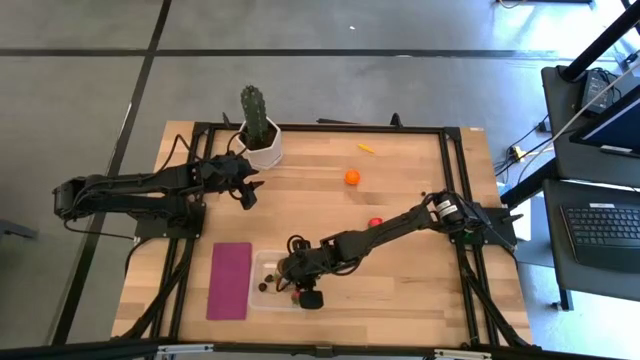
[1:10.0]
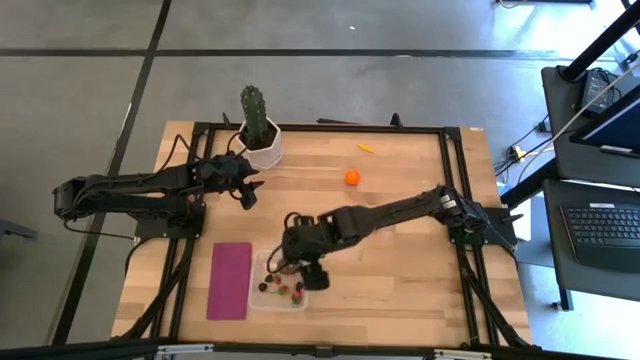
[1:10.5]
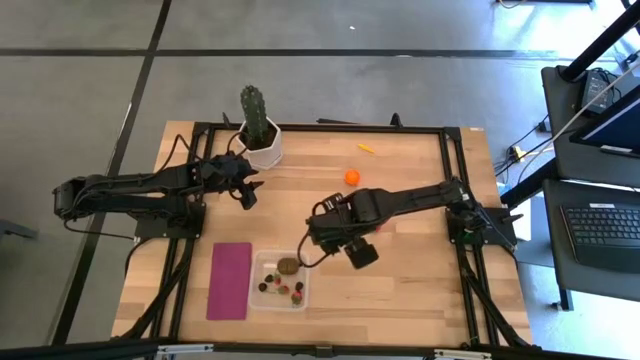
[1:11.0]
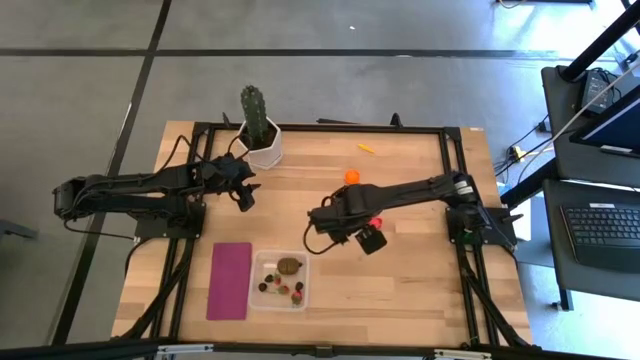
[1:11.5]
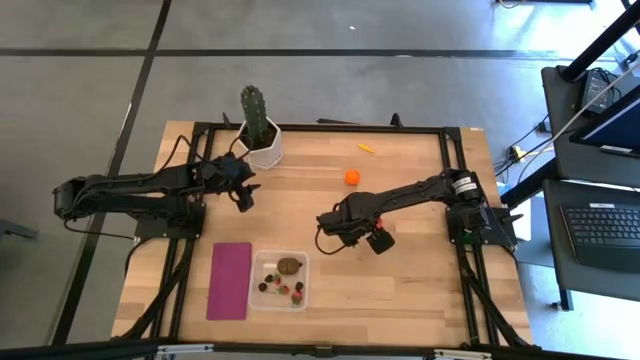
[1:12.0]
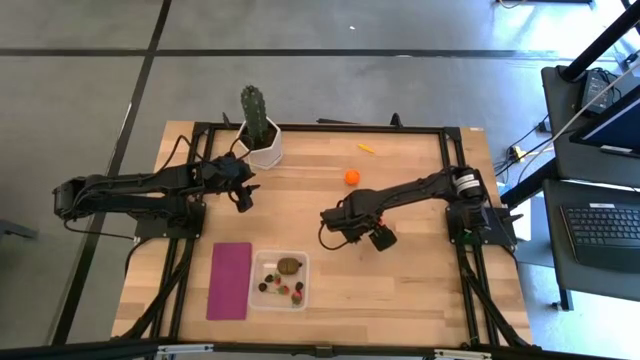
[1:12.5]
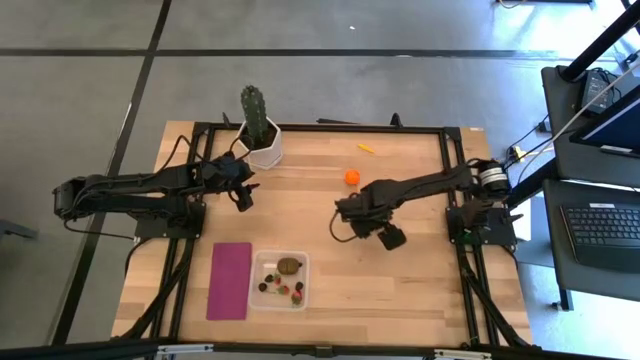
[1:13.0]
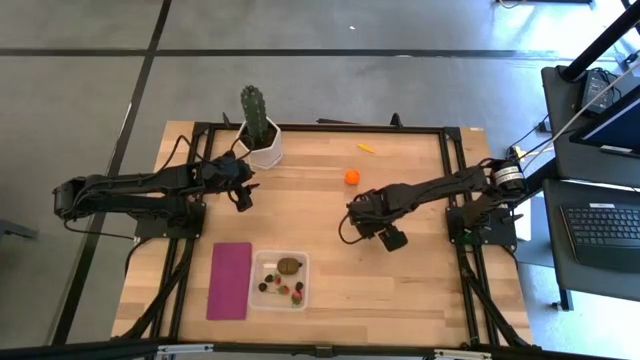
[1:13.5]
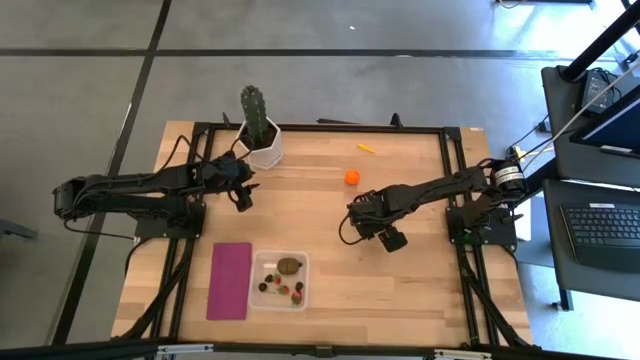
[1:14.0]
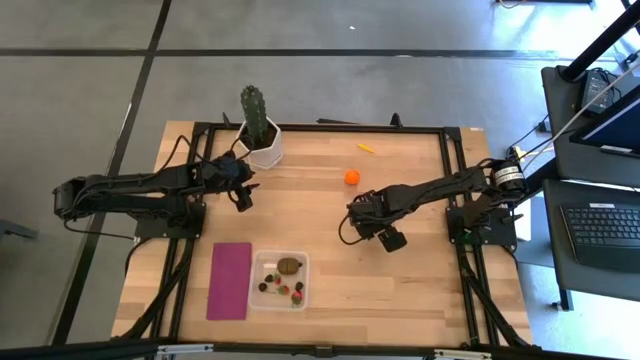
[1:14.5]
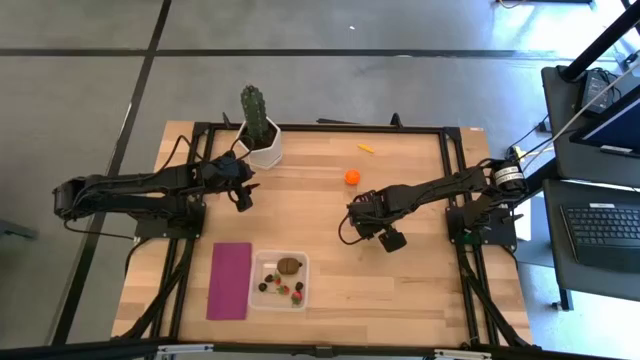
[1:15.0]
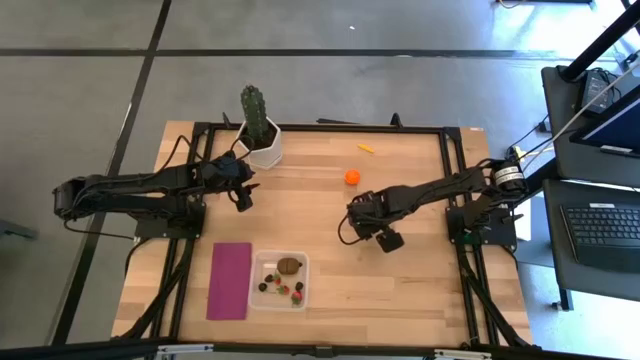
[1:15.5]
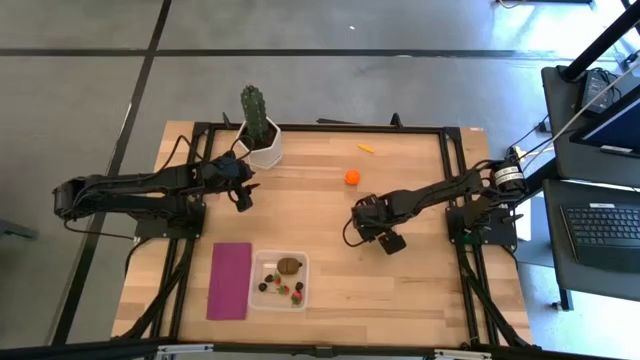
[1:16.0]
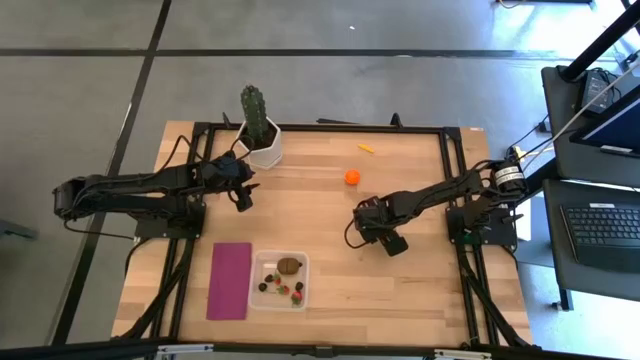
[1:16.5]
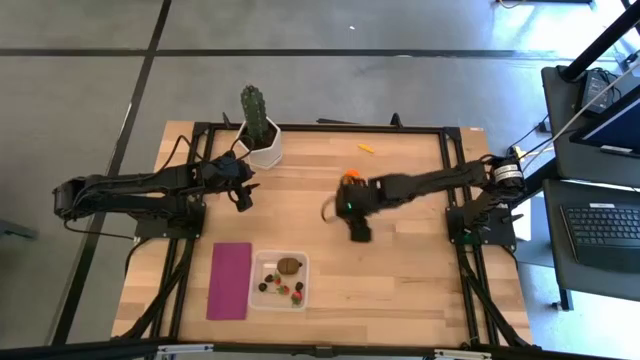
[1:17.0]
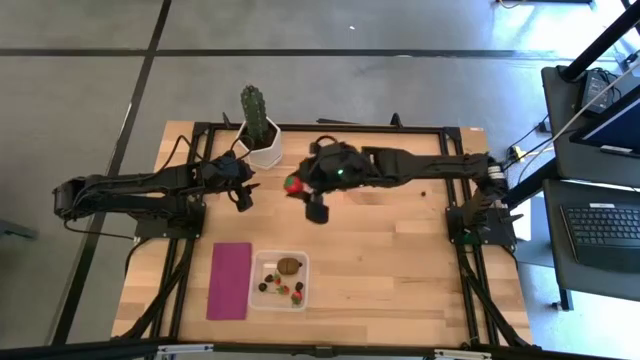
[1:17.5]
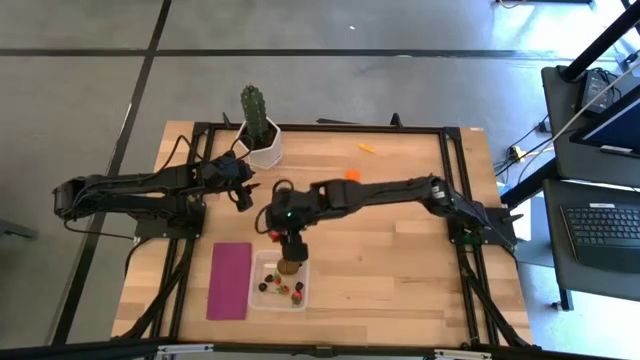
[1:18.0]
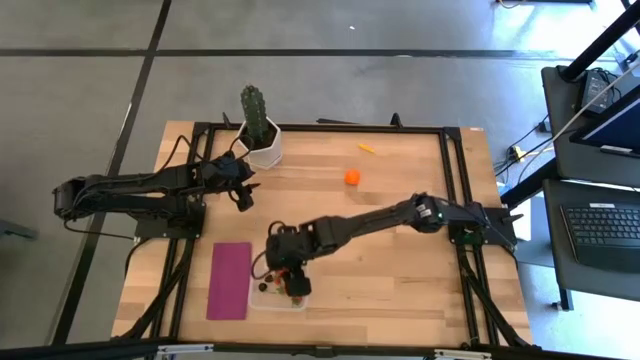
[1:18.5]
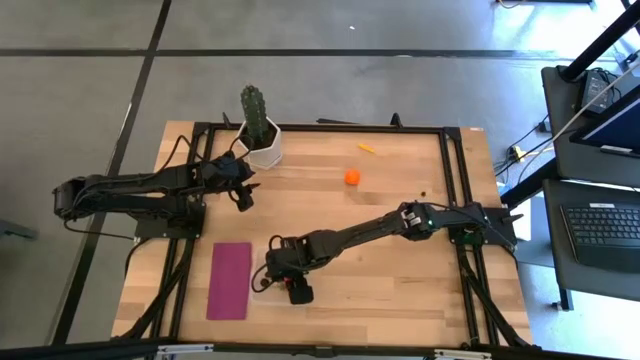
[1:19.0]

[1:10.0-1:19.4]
Task: Pick and placing Produce into tupperware
Put the strawberry into the transparent bin

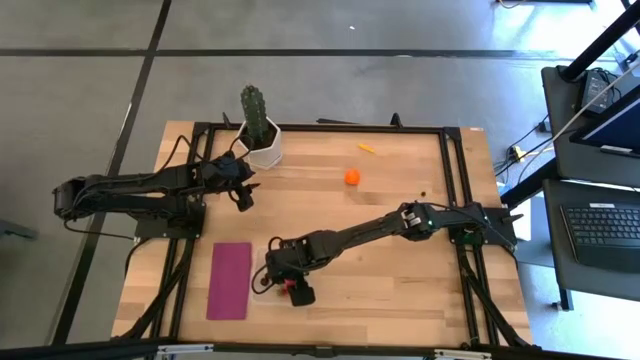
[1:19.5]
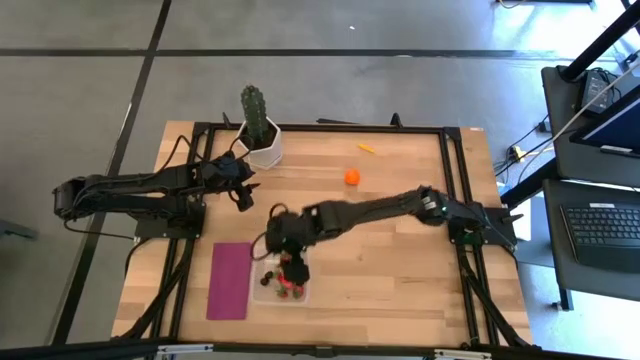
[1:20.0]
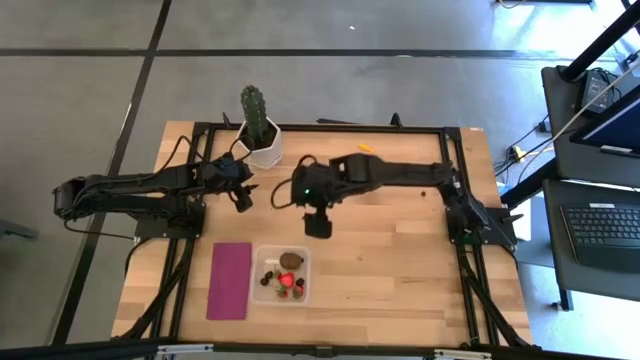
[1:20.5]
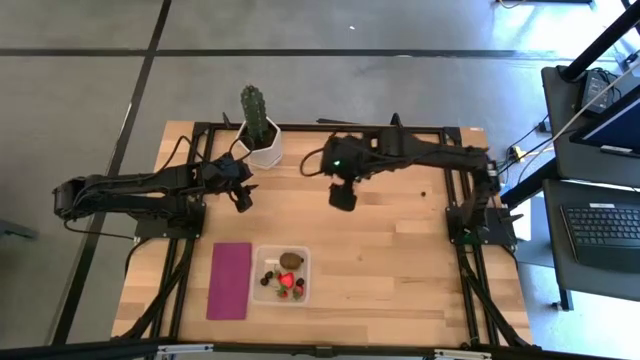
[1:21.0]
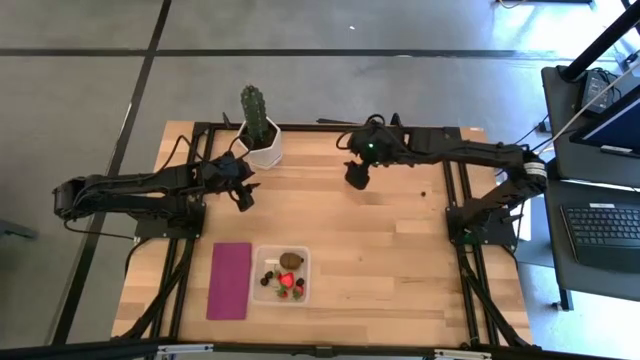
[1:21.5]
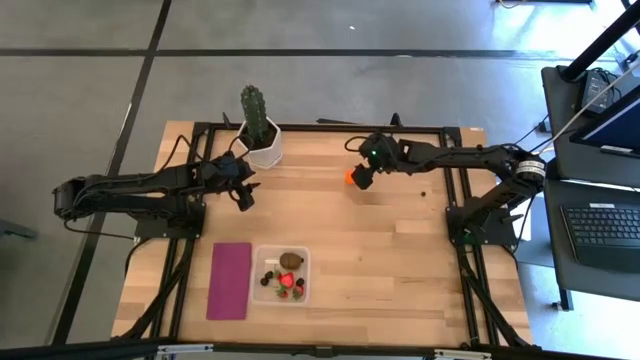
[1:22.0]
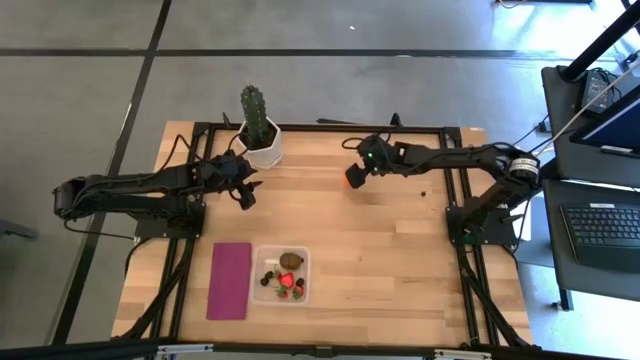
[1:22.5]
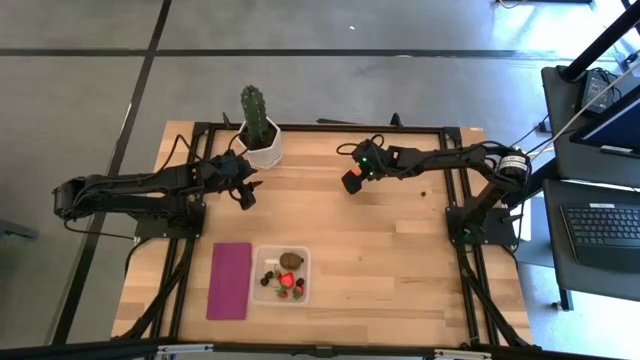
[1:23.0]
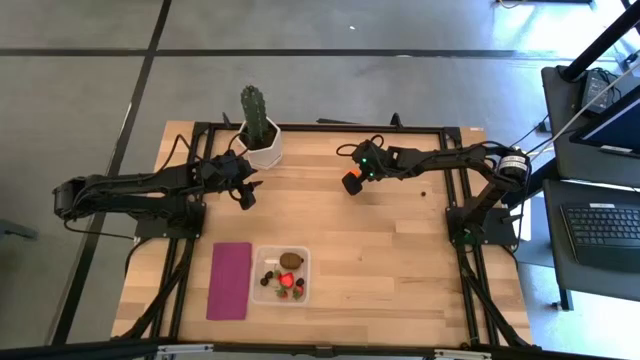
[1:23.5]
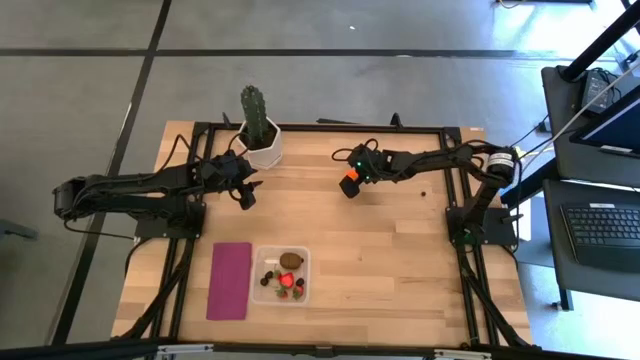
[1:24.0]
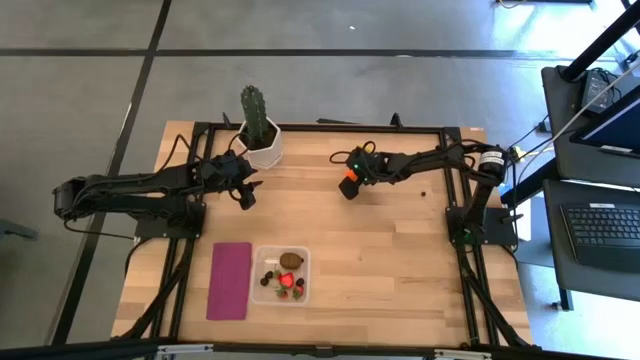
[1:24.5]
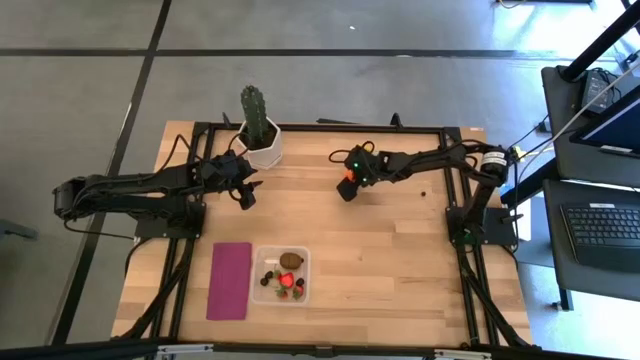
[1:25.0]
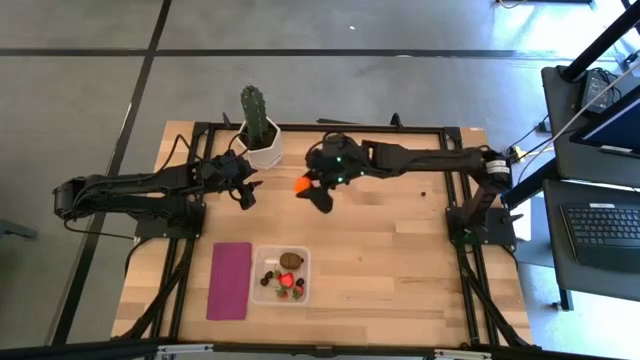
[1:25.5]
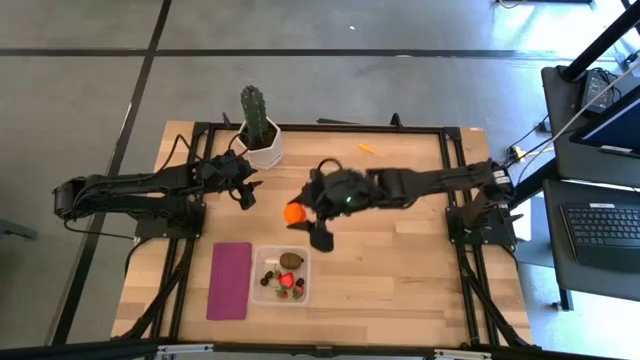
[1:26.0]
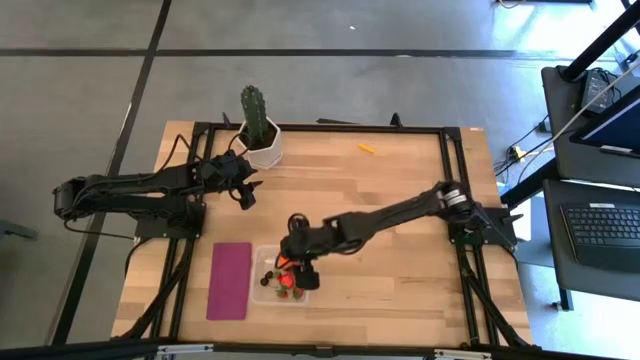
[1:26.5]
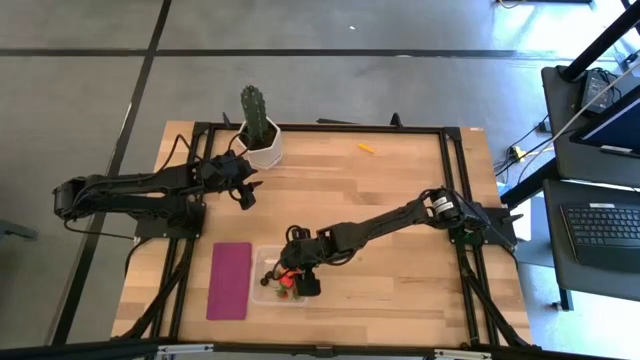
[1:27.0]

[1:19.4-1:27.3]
Put the pumpkin into the transparent bin

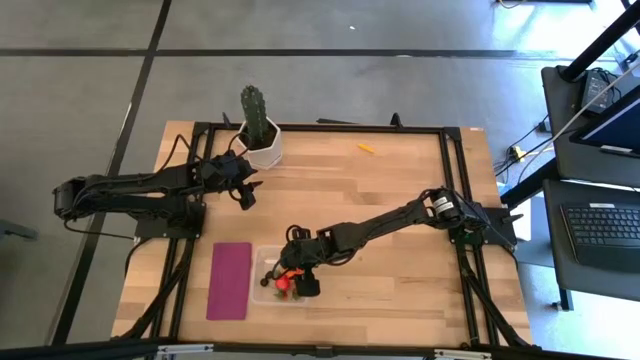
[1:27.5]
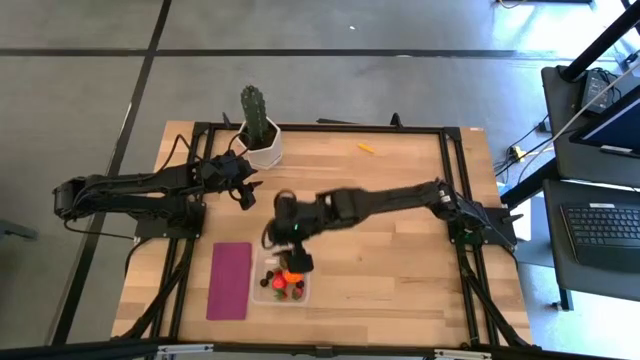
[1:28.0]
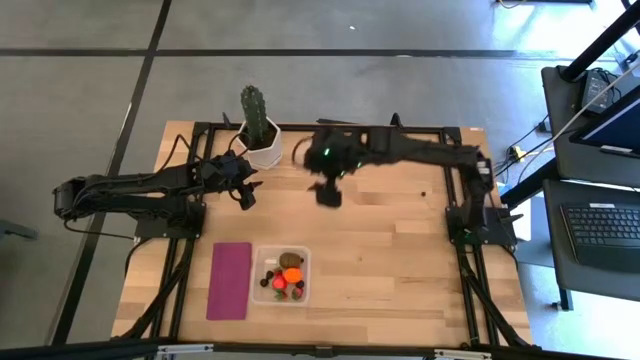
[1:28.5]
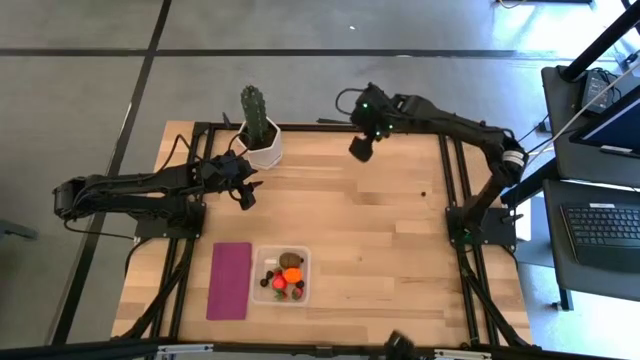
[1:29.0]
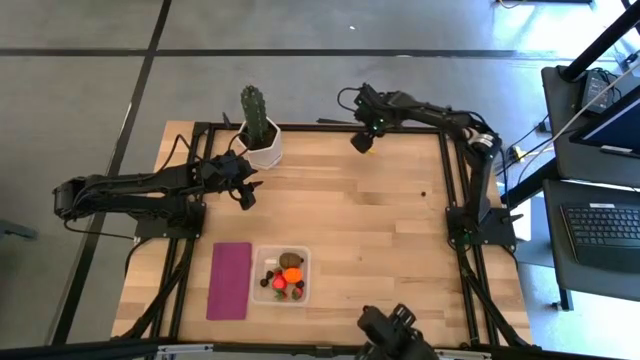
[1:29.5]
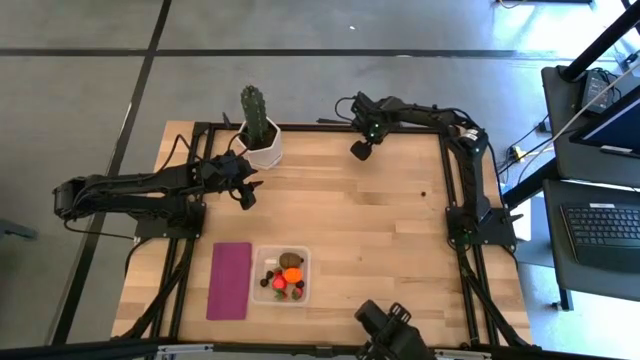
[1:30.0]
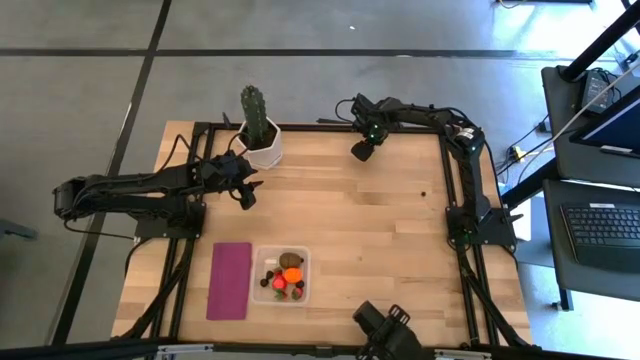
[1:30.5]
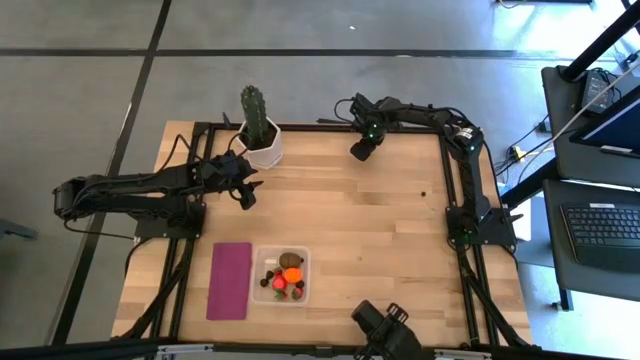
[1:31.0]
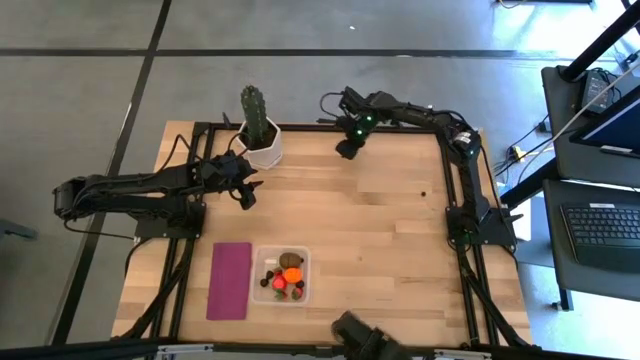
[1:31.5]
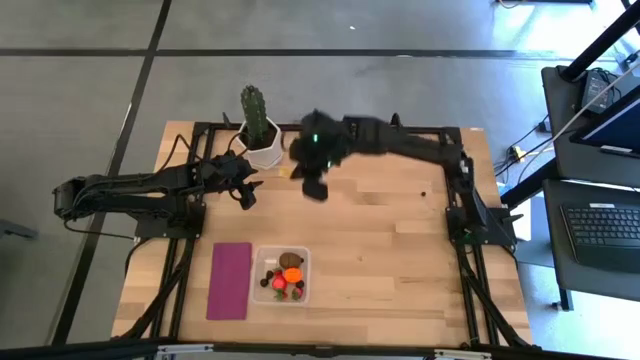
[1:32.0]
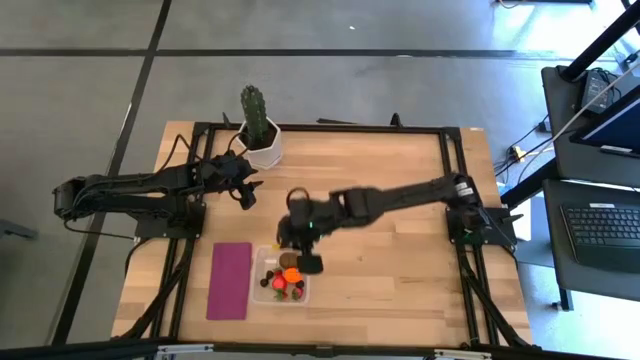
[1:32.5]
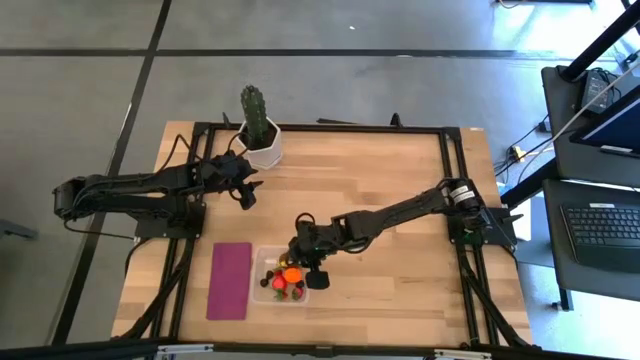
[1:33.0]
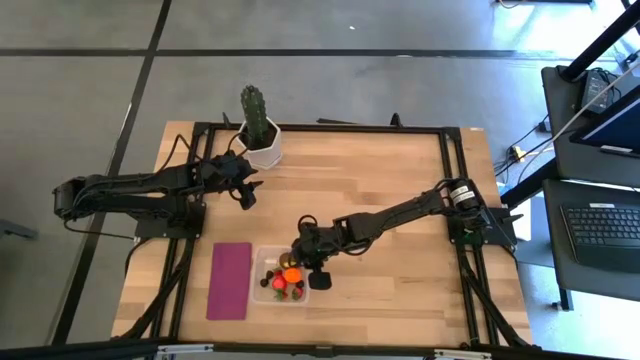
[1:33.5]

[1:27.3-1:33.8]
Put the corn into the transparent bin
